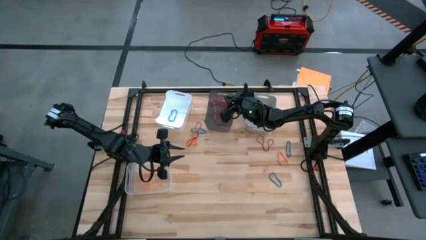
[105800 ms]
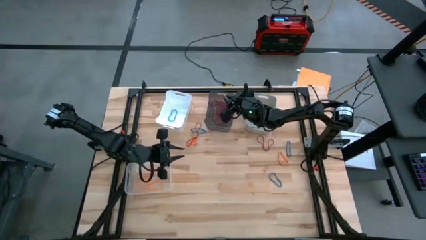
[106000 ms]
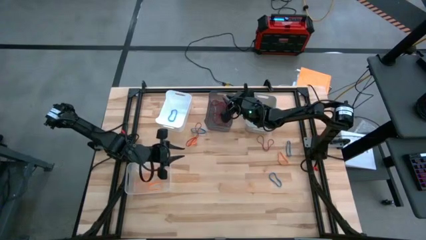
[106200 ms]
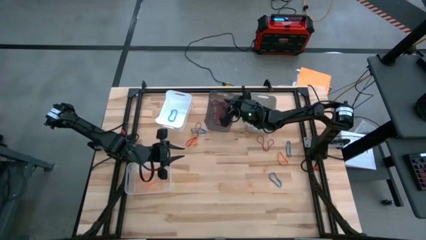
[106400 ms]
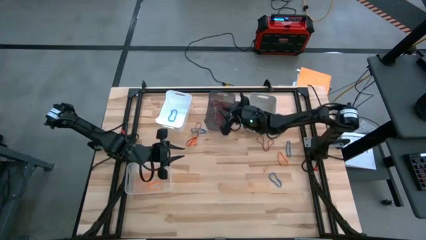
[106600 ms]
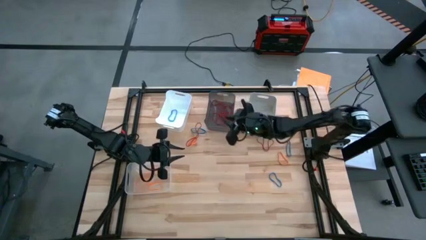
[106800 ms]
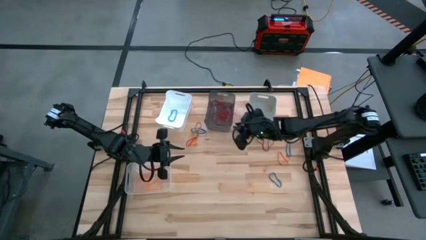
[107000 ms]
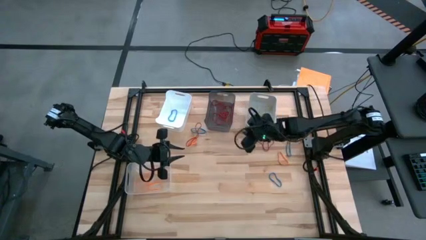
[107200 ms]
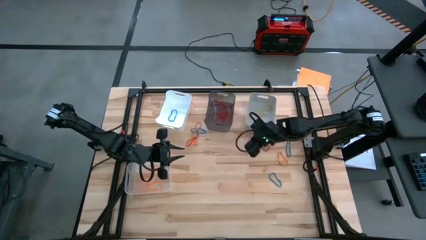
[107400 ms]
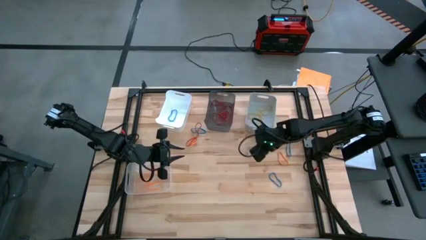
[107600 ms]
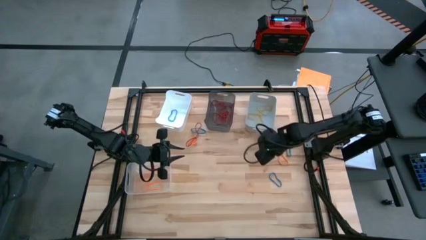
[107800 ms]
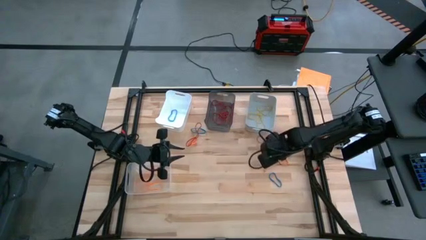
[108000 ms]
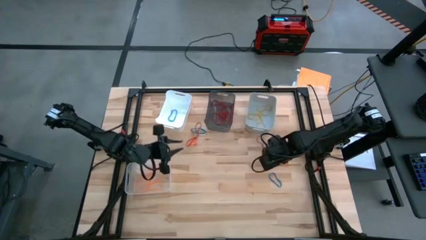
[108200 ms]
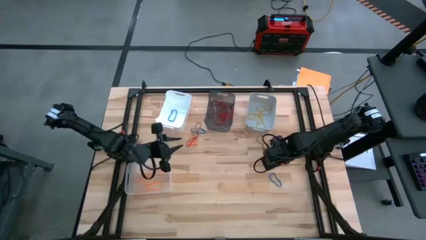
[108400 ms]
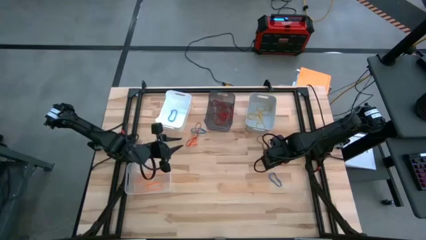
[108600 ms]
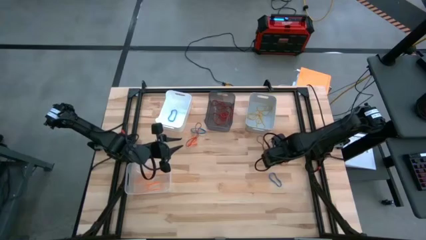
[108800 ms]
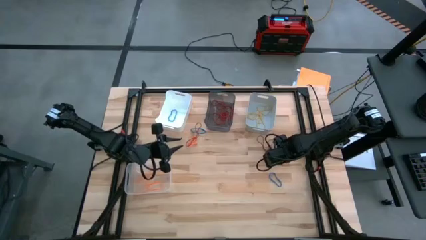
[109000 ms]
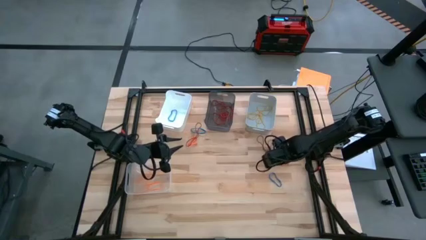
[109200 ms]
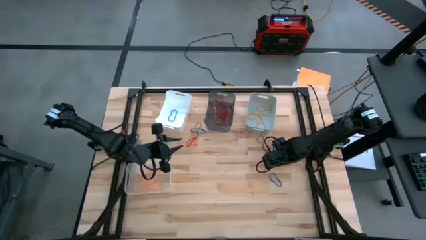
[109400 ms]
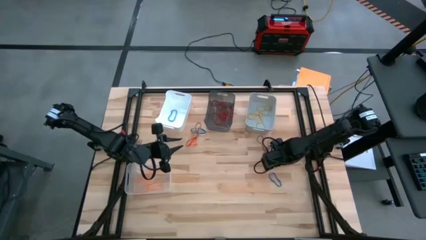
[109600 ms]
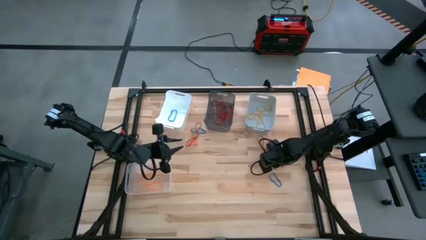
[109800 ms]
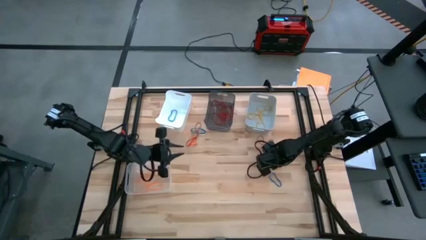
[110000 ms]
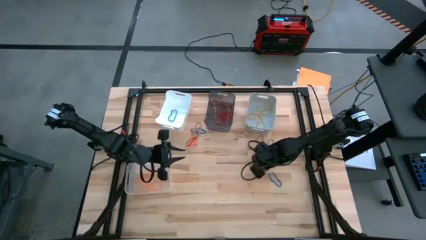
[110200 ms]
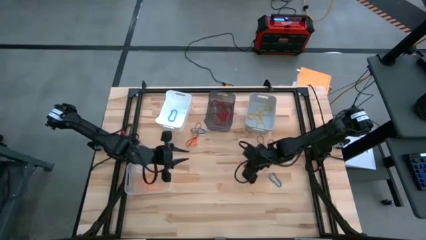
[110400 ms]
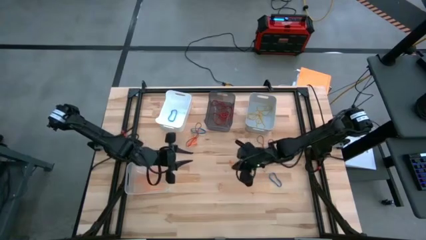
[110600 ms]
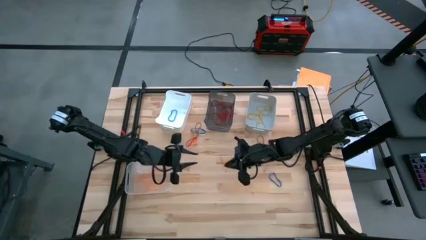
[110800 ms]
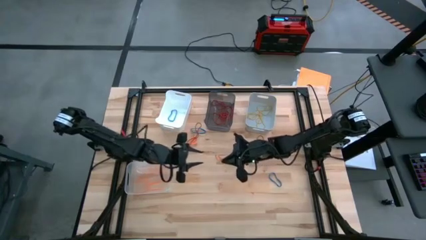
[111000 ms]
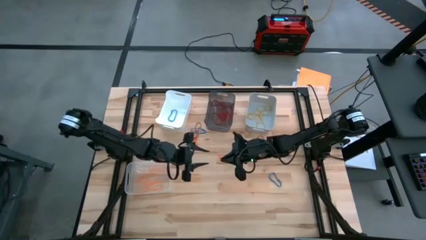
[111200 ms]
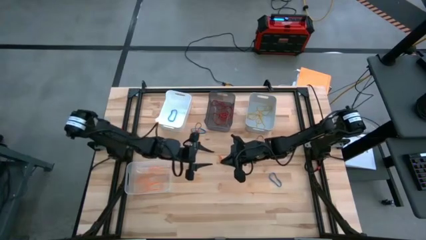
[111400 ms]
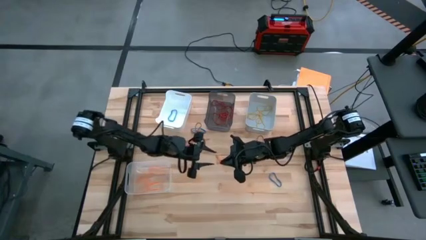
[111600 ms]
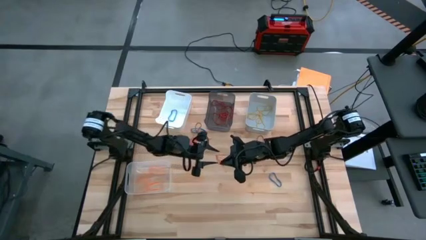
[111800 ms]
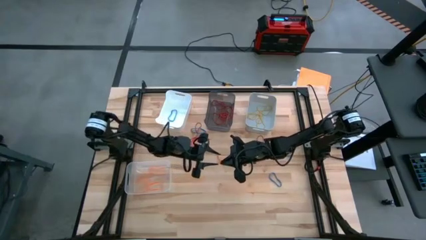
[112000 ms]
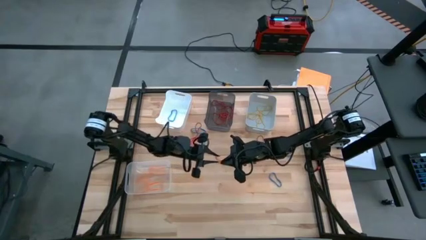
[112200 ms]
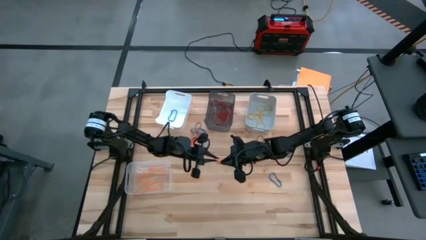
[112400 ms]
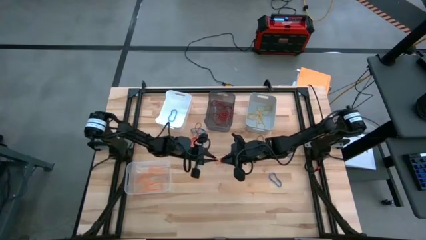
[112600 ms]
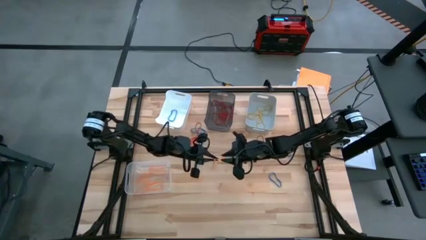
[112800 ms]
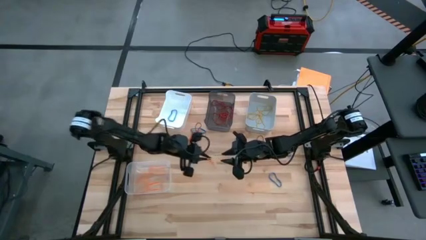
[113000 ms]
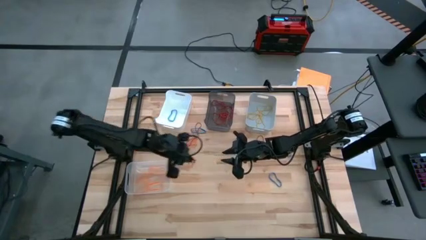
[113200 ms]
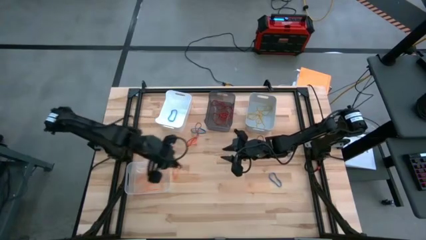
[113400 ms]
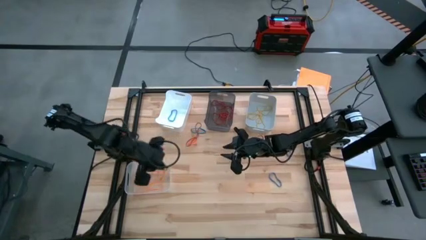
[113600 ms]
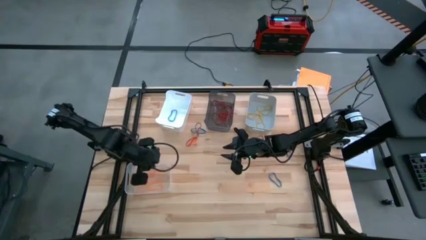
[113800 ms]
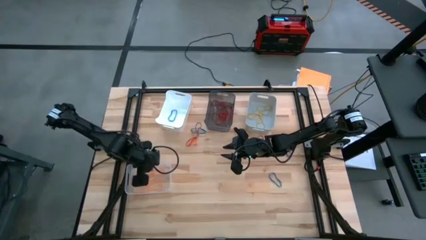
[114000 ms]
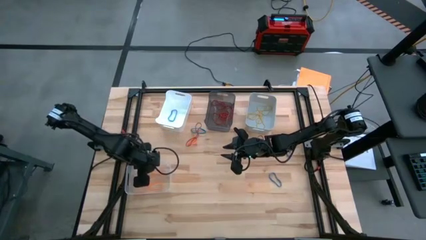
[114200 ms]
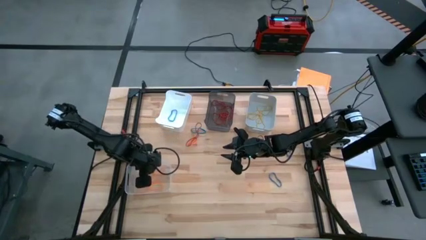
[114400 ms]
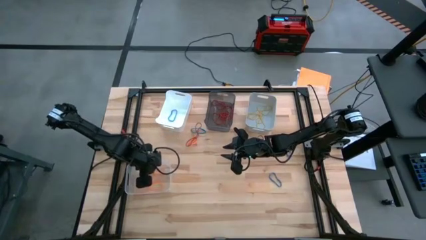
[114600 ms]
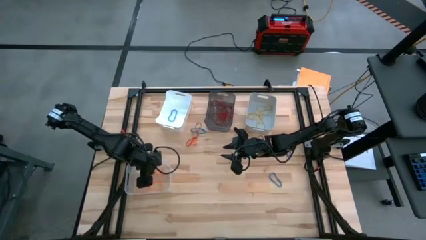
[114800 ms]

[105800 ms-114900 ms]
Task: Sort rubber bands into baskets
Put the orange rubber band into the transparent bin

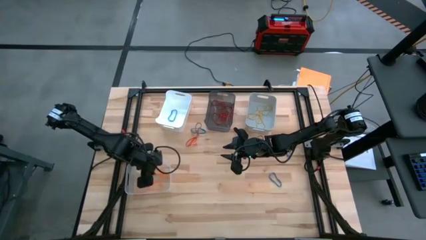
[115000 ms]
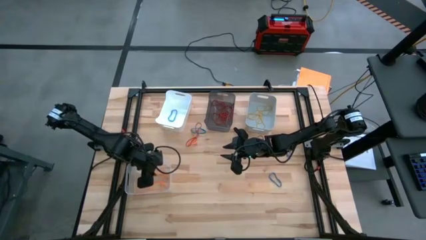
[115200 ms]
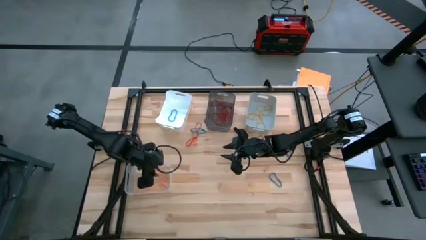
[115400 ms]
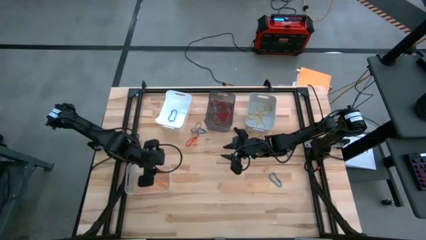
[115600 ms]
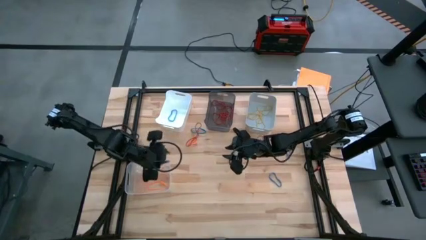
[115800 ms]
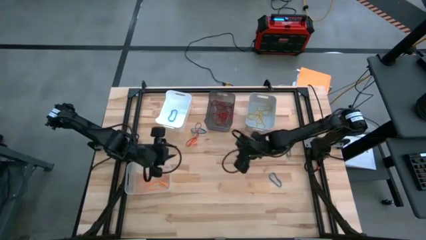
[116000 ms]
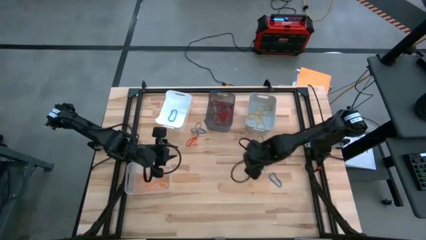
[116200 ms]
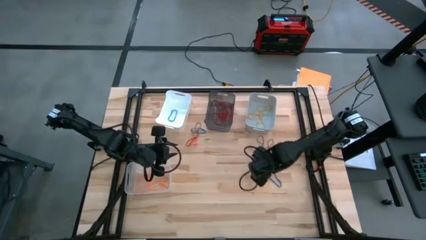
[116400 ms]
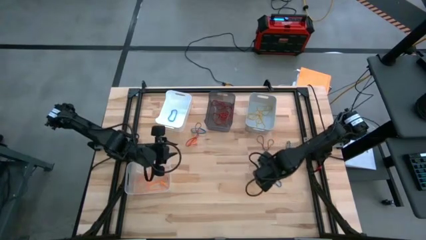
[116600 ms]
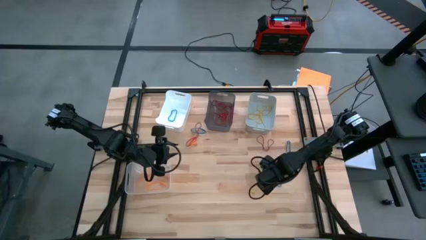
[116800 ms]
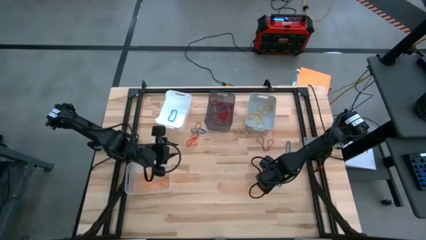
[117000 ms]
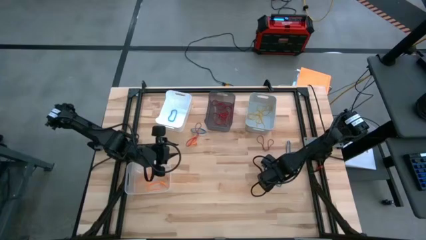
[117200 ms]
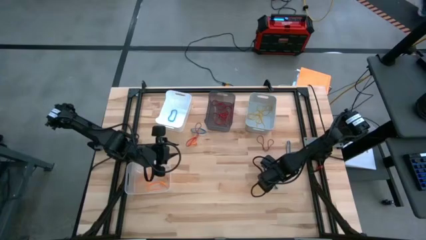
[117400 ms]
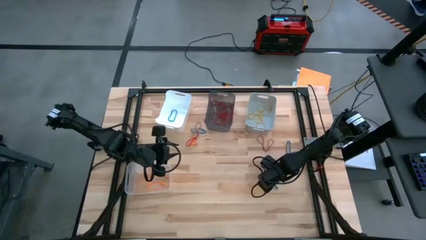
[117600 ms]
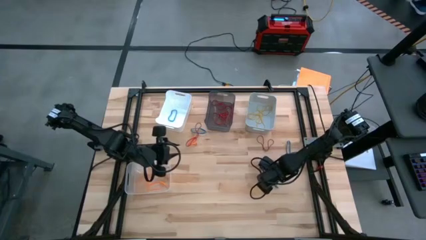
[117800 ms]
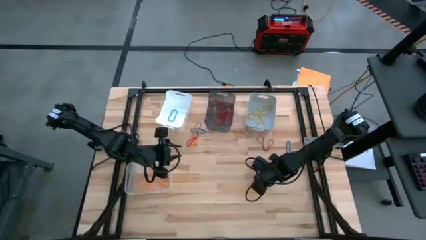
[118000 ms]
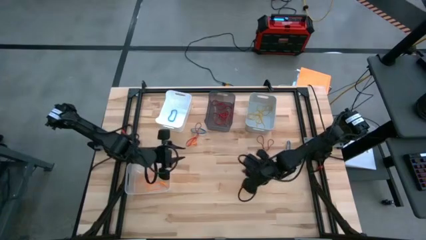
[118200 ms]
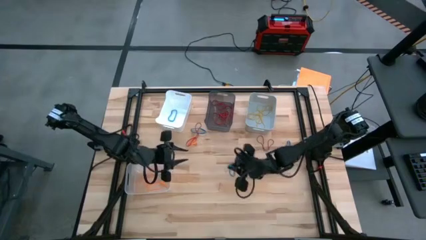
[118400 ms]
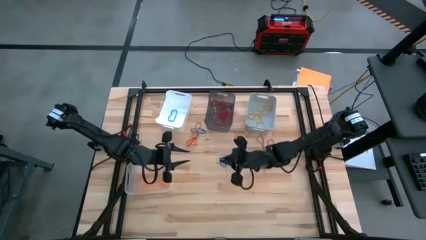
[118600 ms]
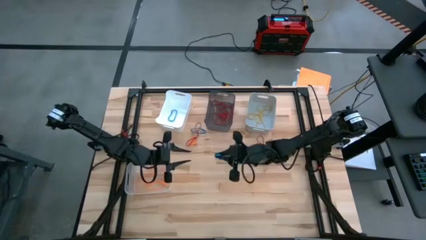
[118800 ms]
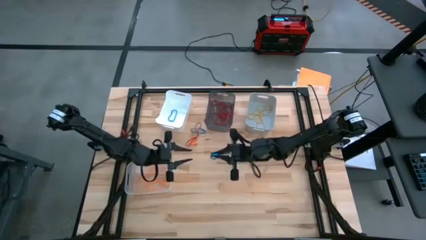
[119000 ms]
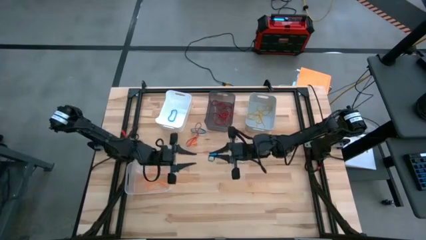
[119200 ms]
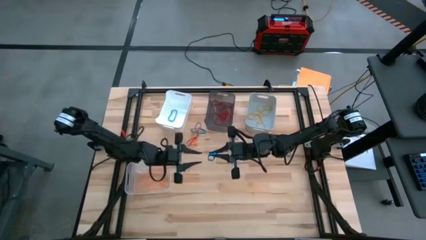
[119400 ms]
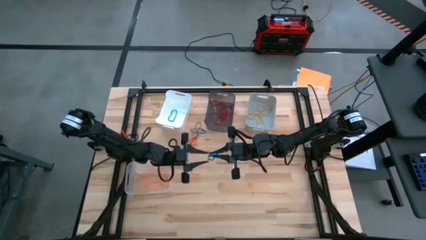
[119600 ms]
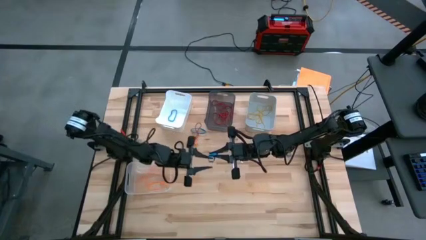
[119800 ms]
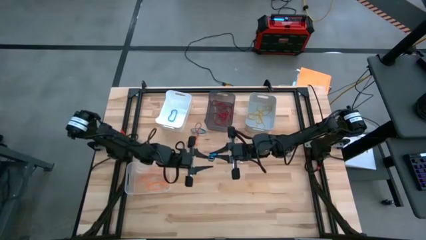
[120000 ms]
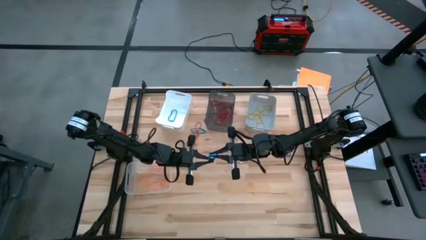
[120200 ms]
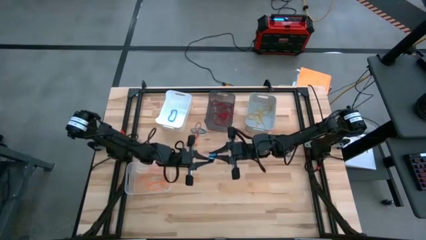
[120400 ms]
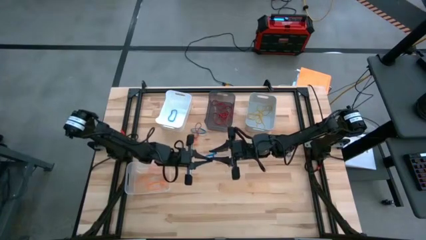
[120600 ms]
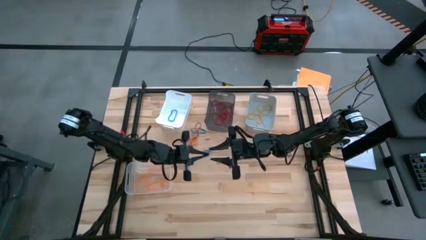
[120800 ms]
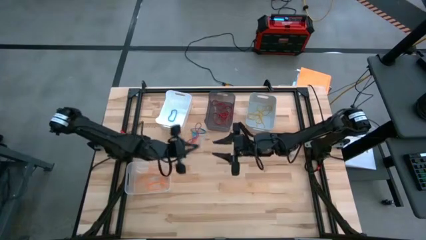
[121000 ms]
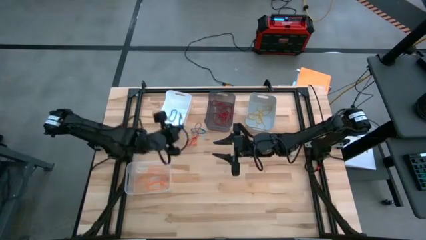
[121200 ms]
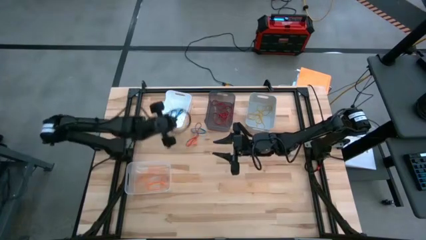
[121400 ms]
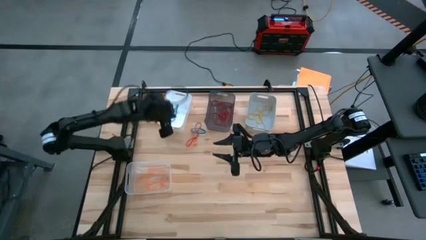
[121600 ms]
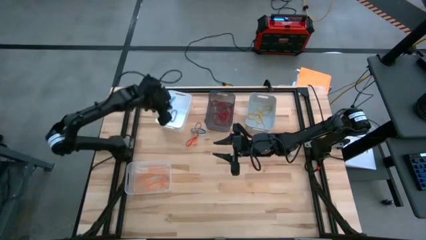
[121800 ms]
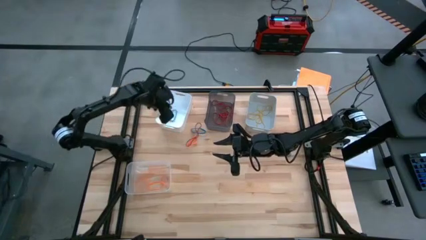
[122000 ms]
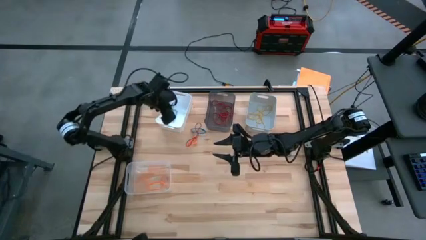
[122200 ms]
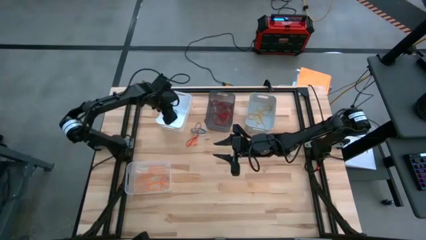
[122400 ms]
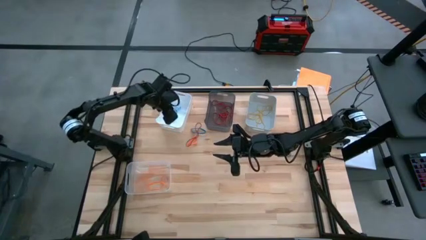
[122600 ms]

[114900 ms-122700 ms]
Put the blue rubber band into the white bin
